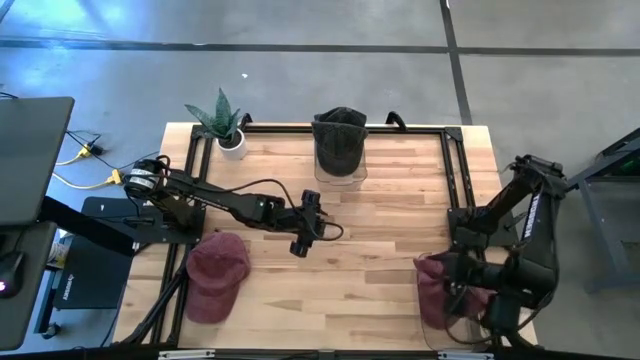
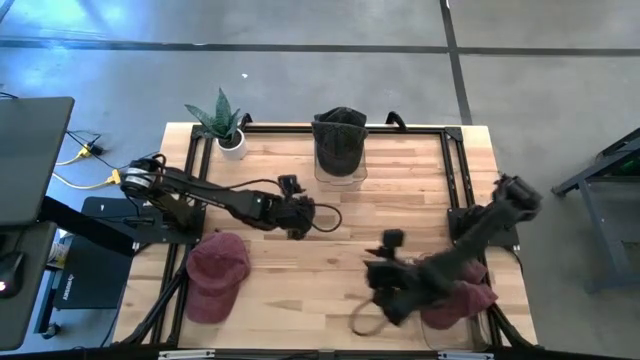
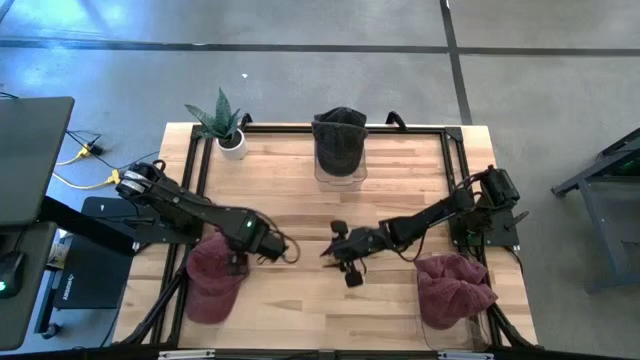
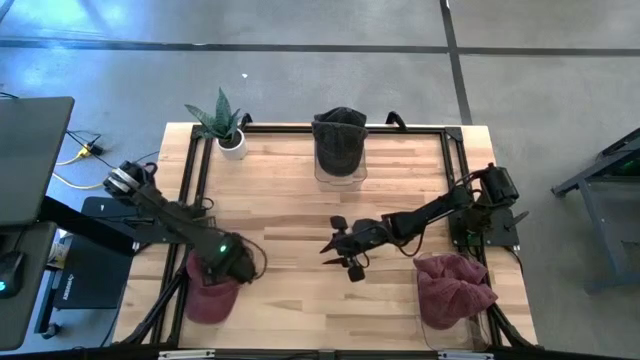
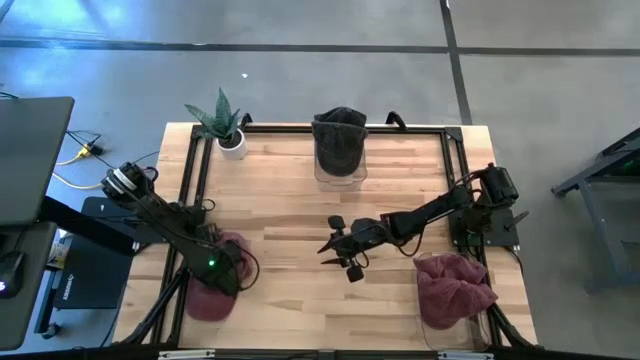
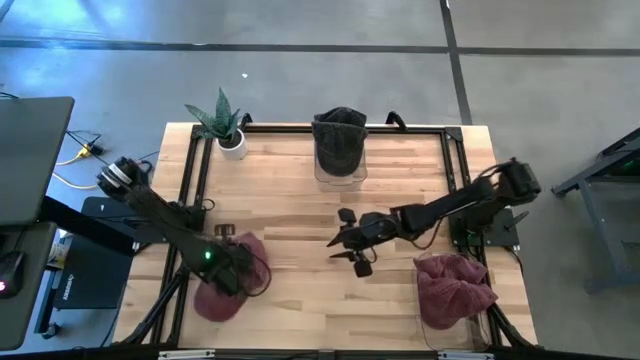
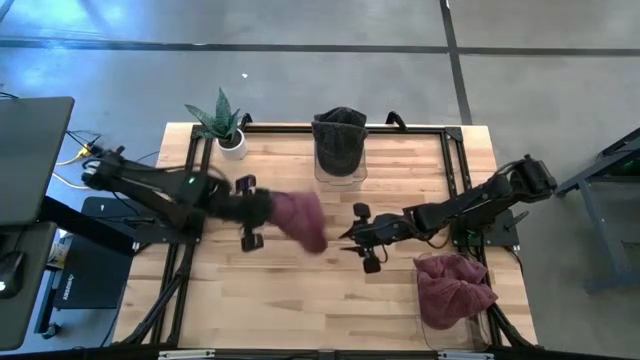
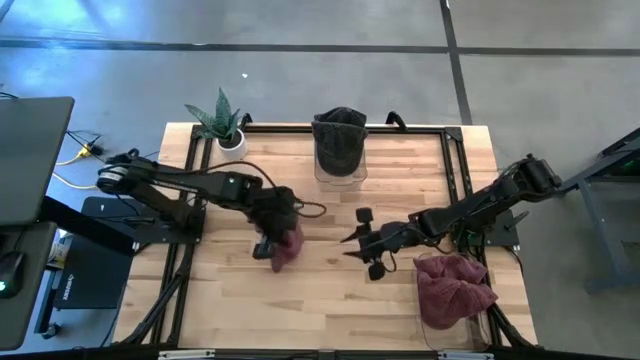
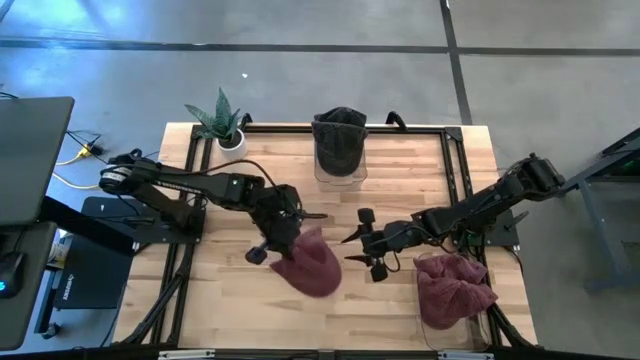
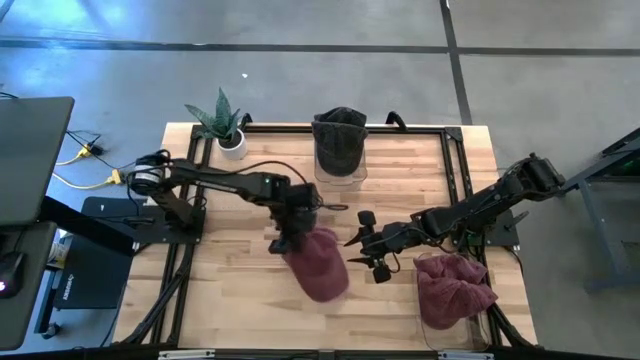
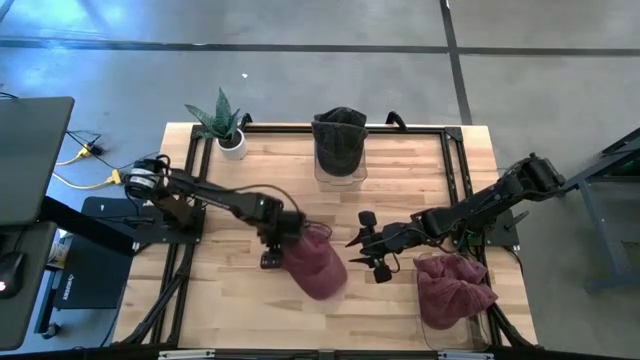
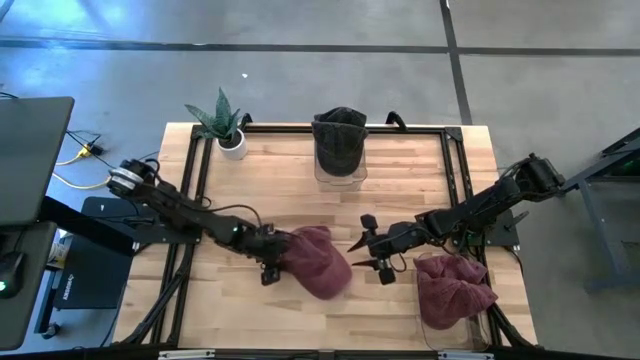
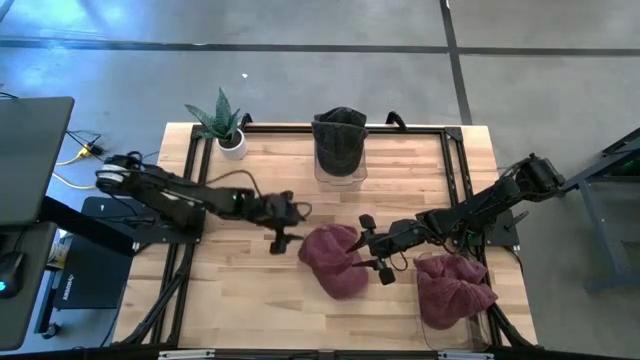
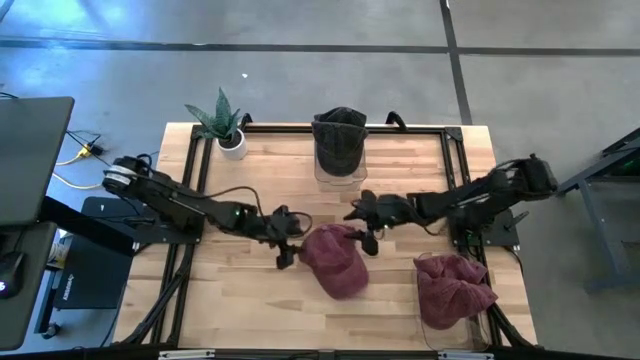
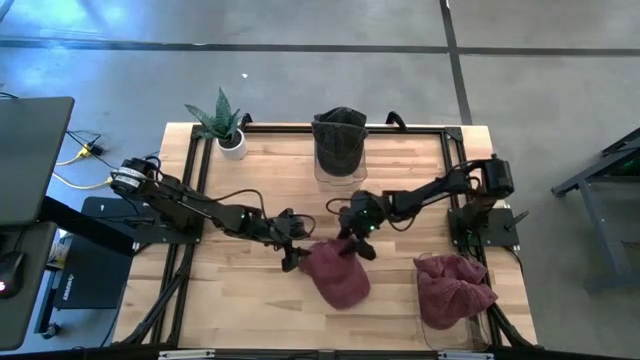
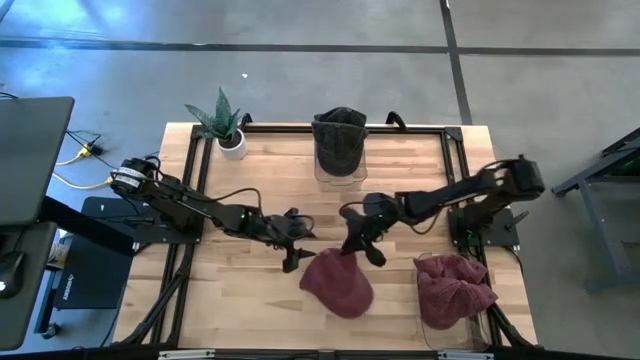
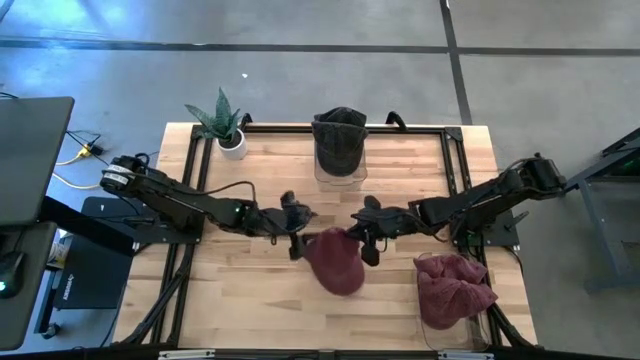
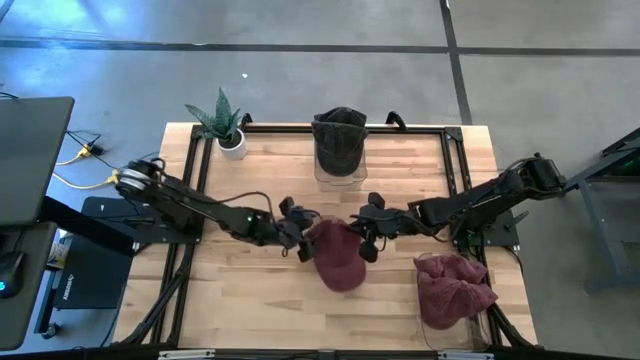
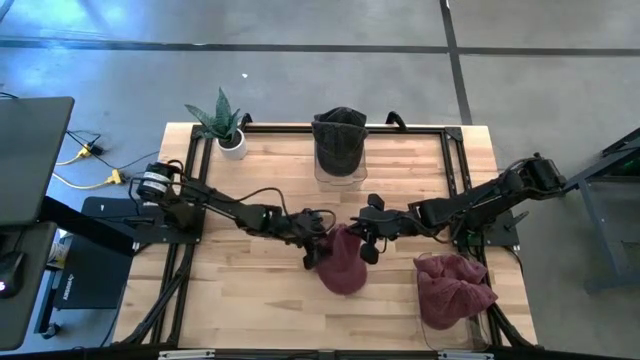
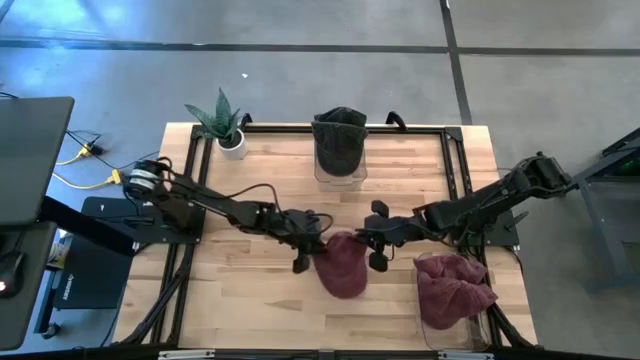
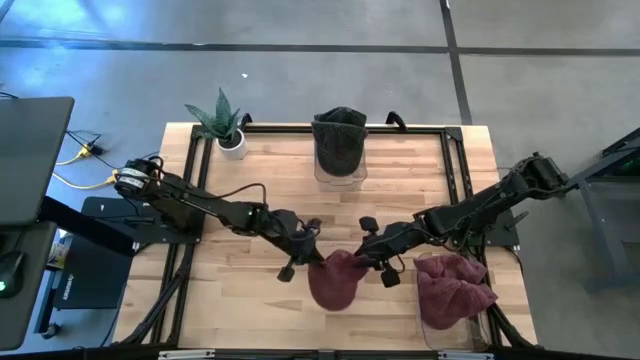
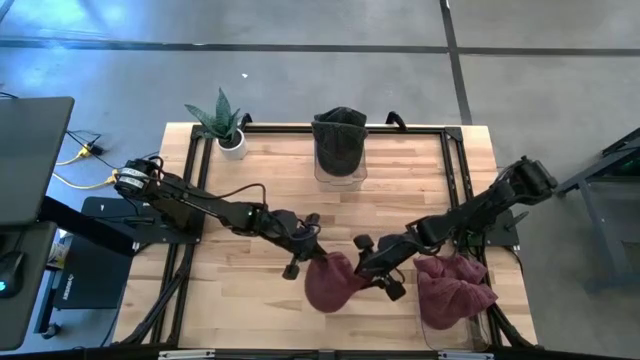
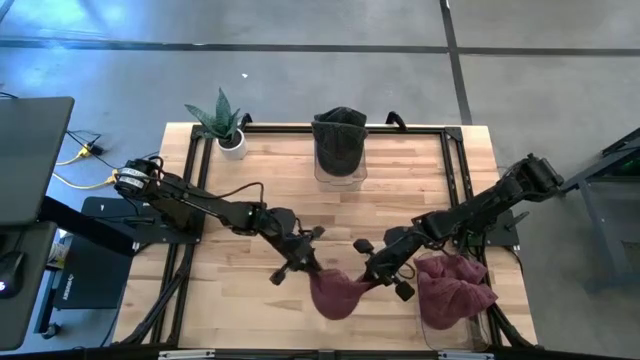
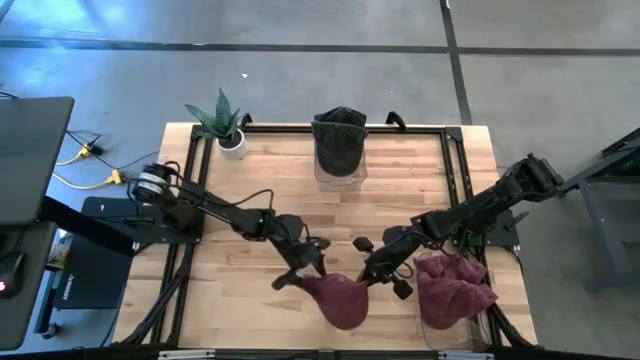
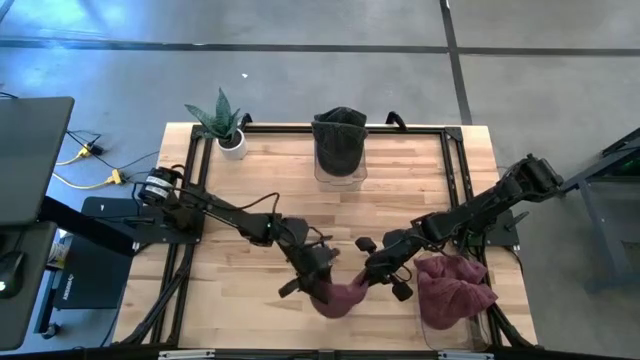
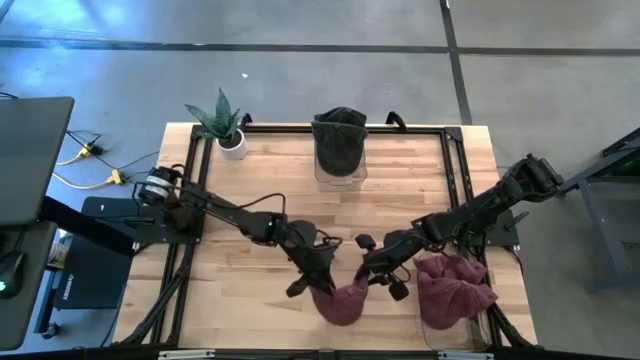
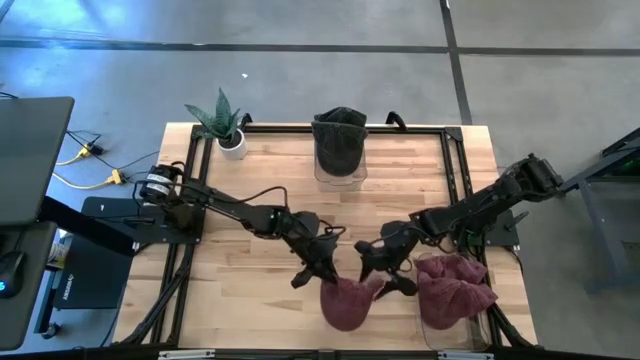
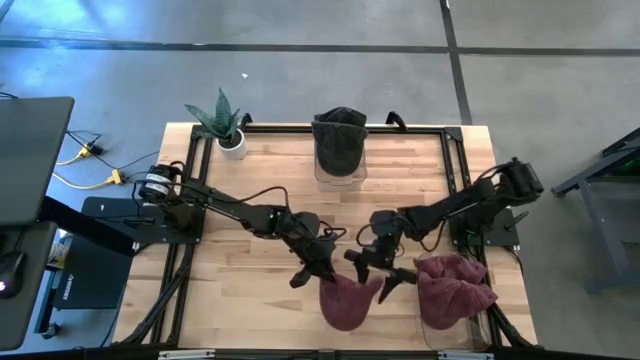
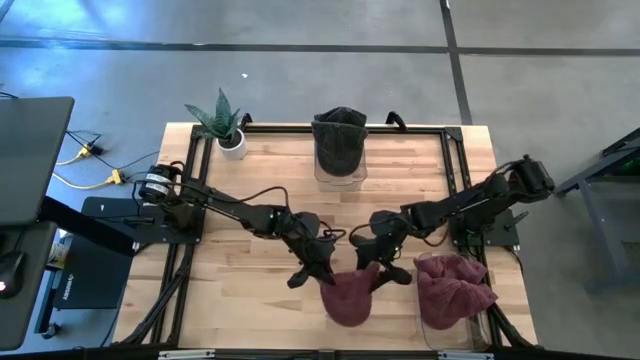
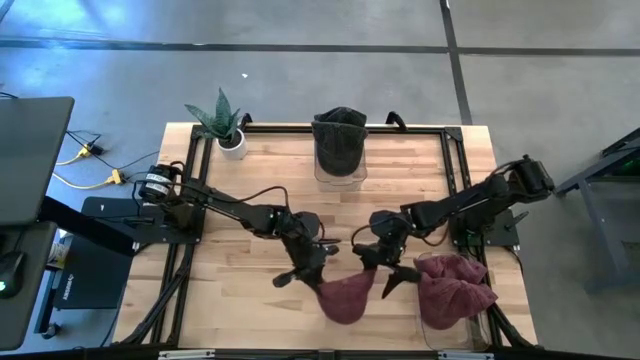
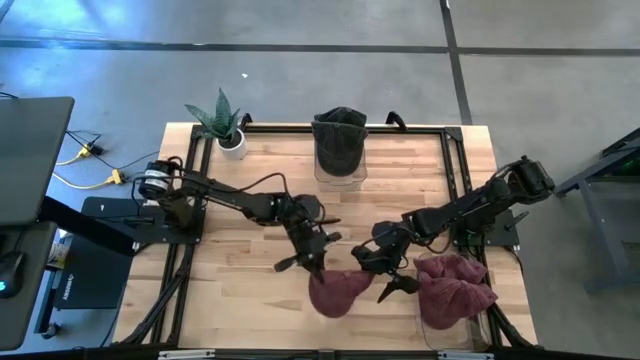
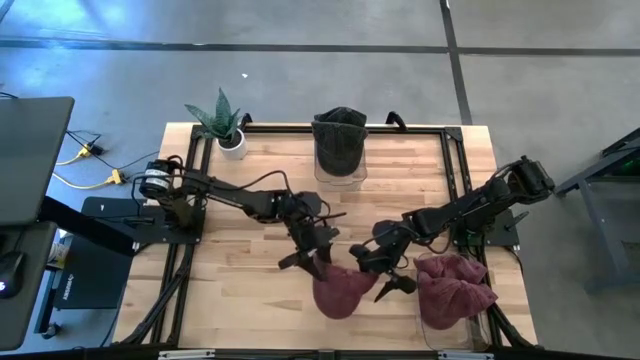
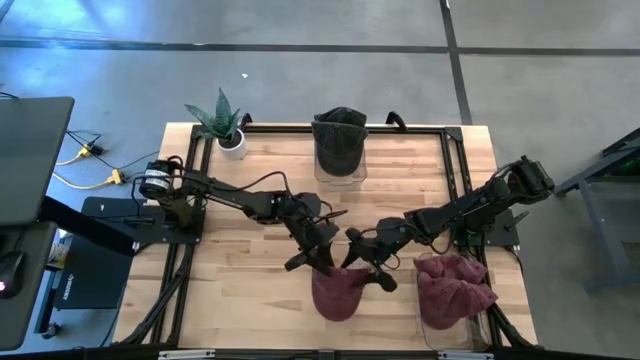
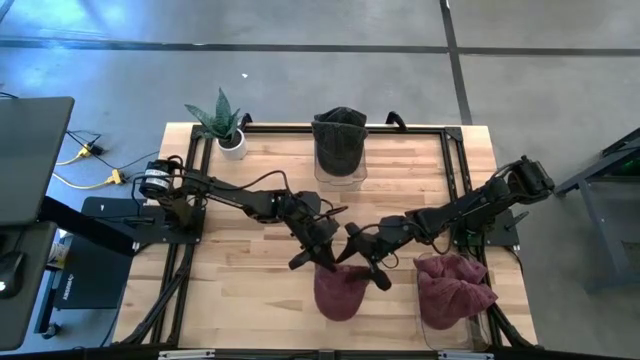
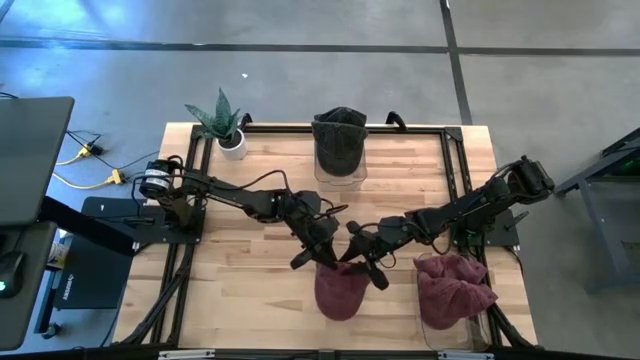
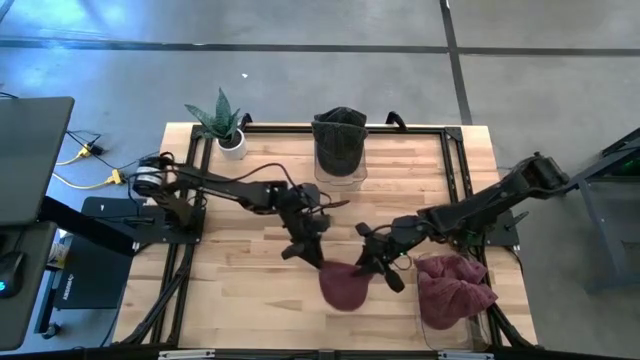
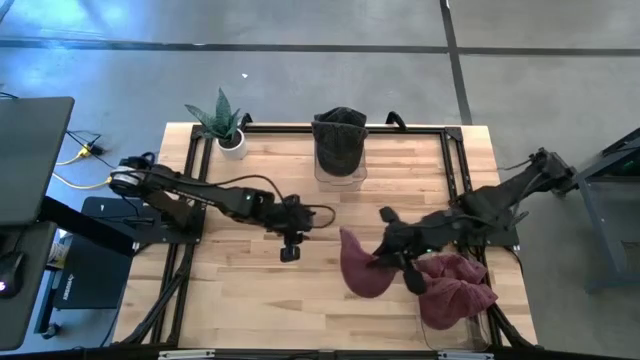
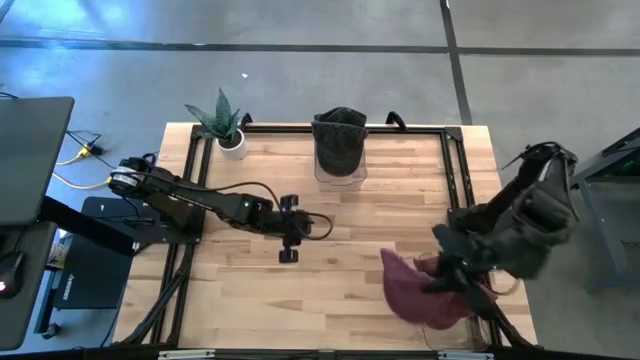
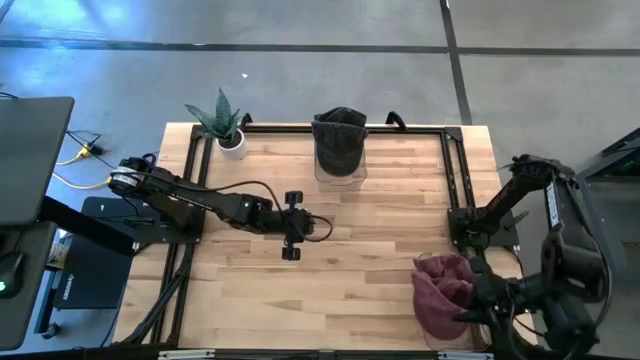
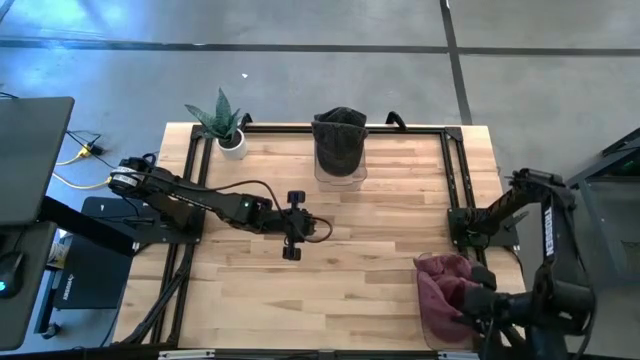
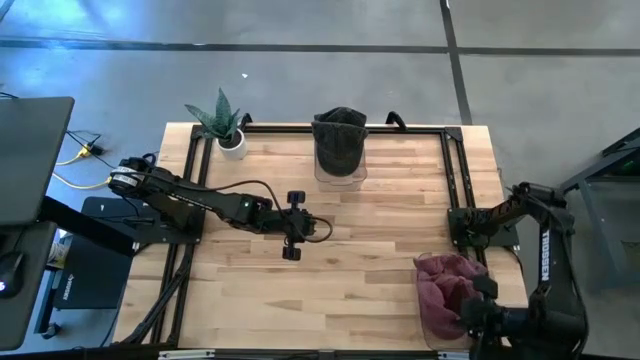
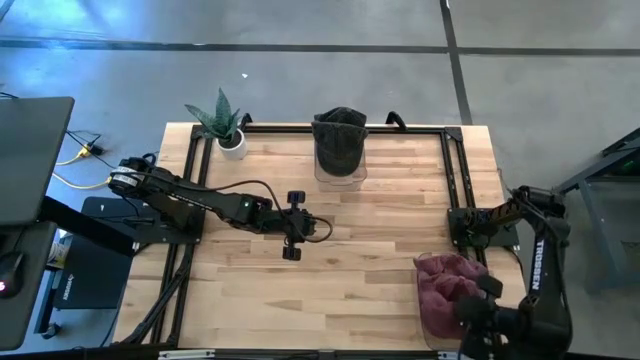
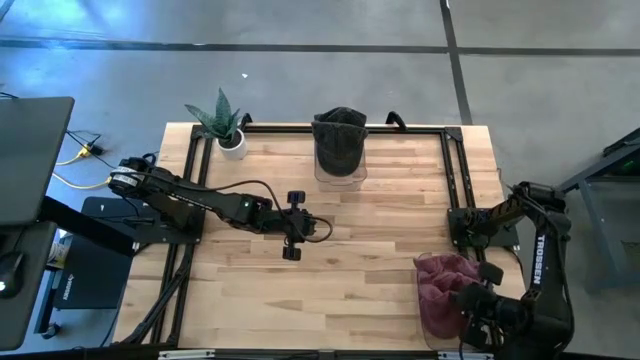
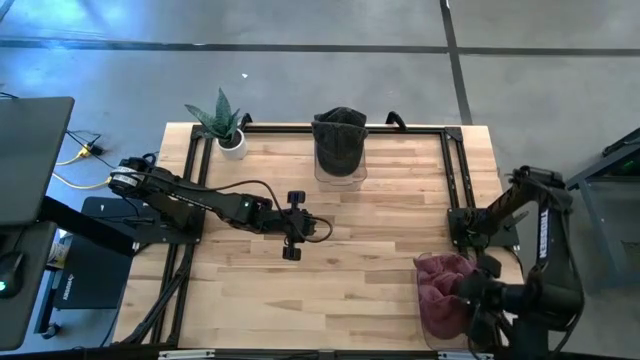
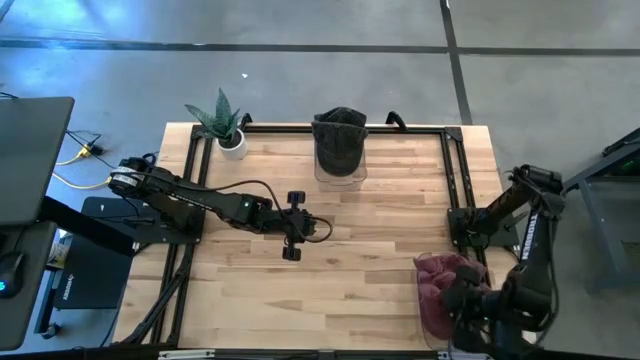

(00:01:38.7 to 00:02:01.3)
Task: Pick & Place hat
Put the red cap into the bottom transparent bin
